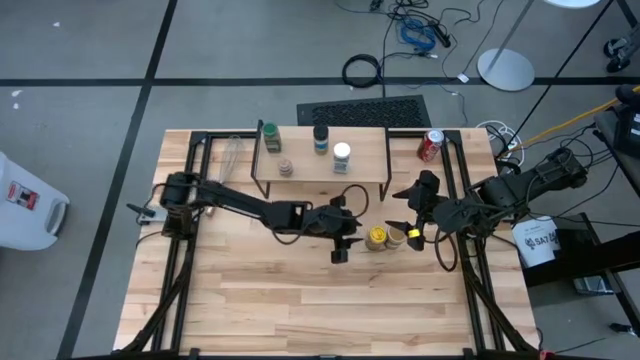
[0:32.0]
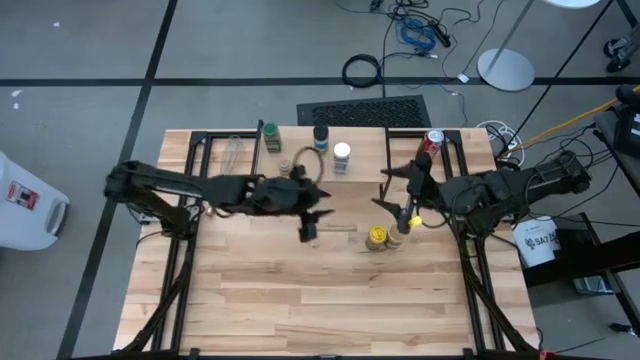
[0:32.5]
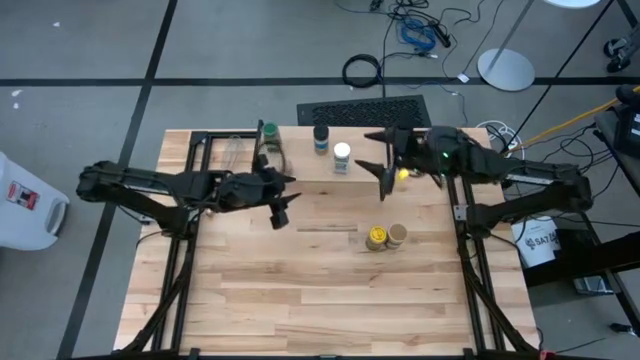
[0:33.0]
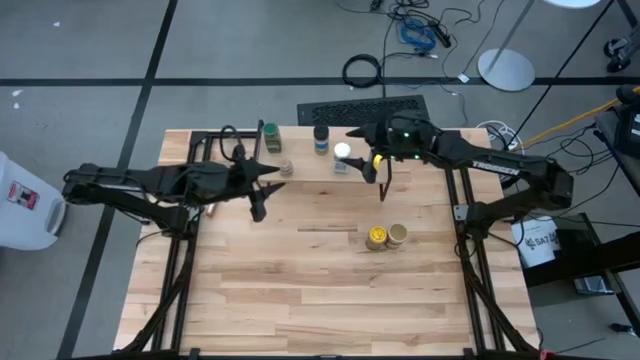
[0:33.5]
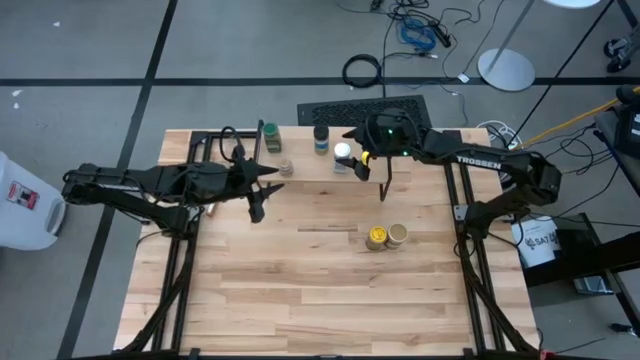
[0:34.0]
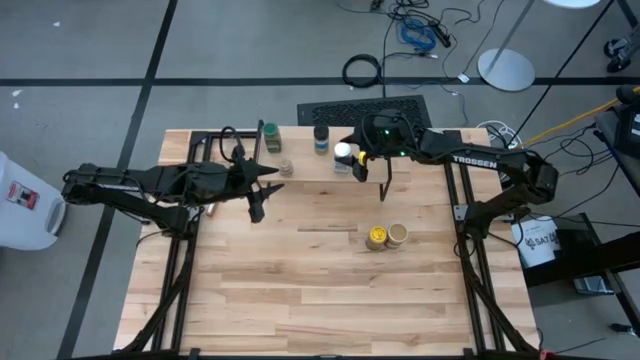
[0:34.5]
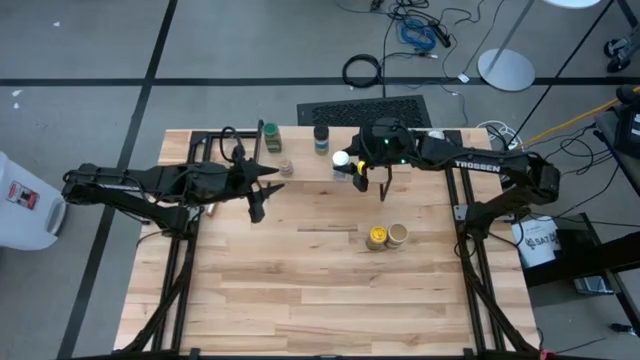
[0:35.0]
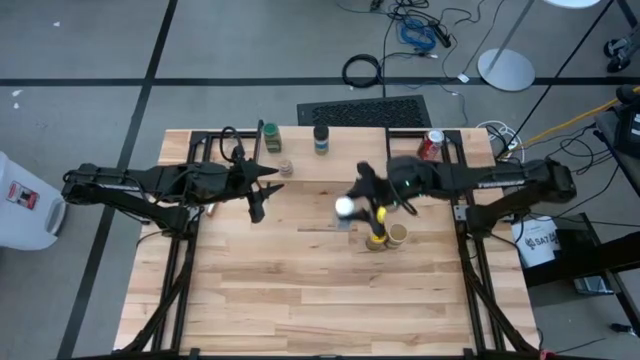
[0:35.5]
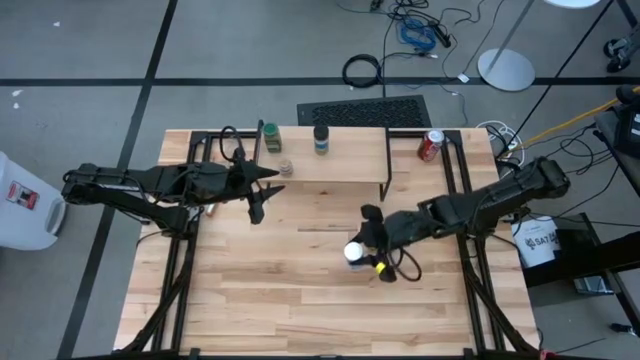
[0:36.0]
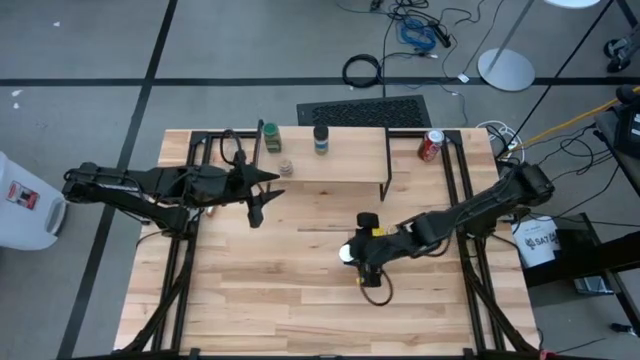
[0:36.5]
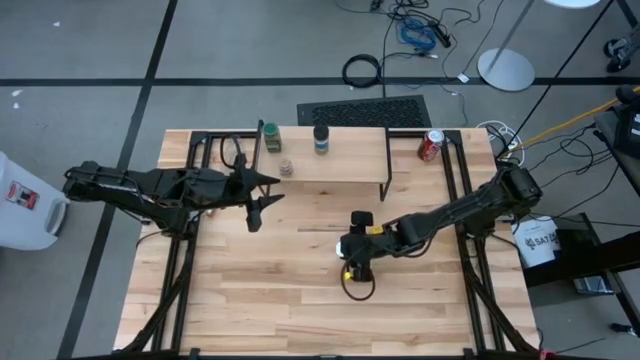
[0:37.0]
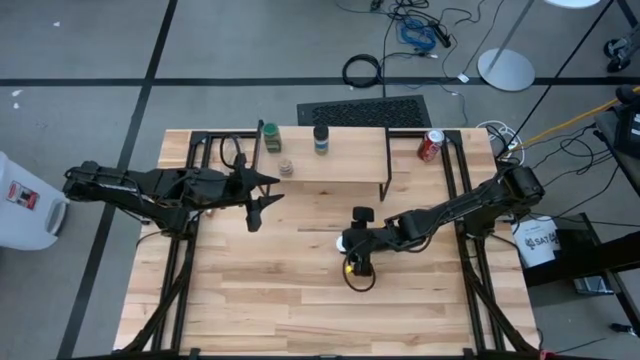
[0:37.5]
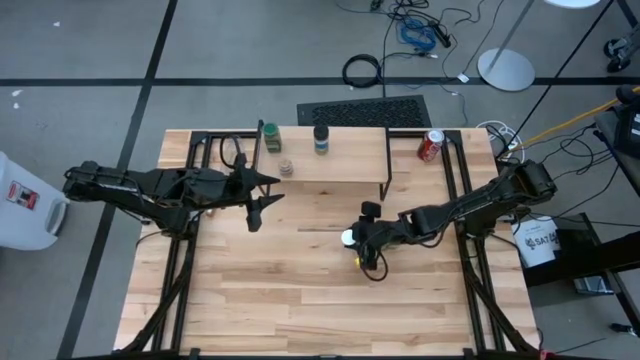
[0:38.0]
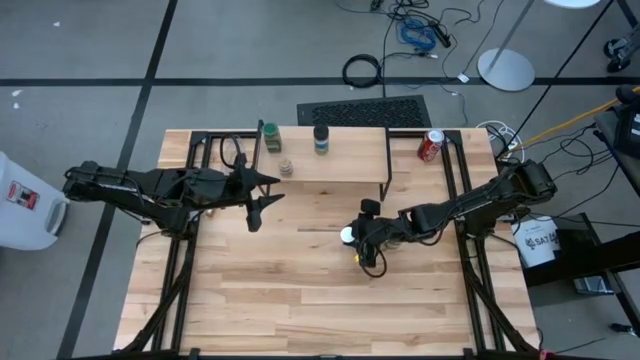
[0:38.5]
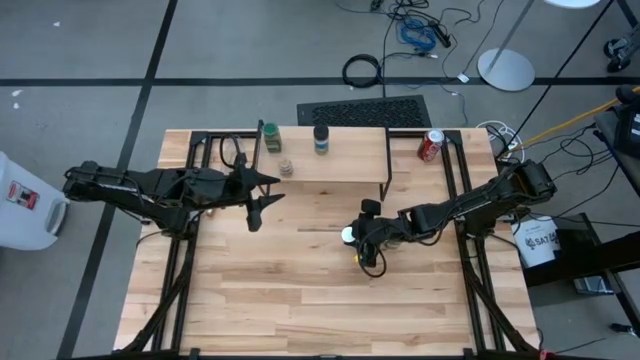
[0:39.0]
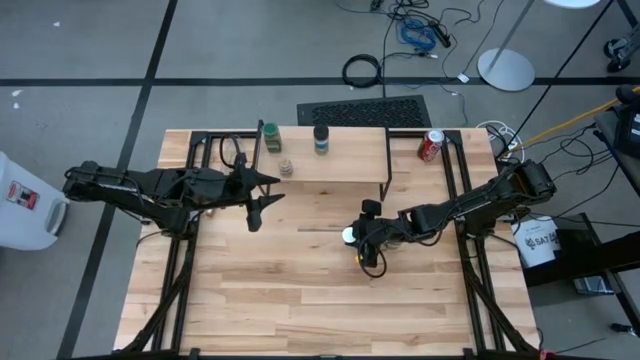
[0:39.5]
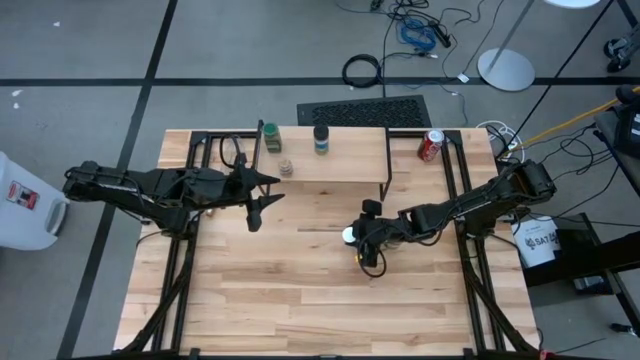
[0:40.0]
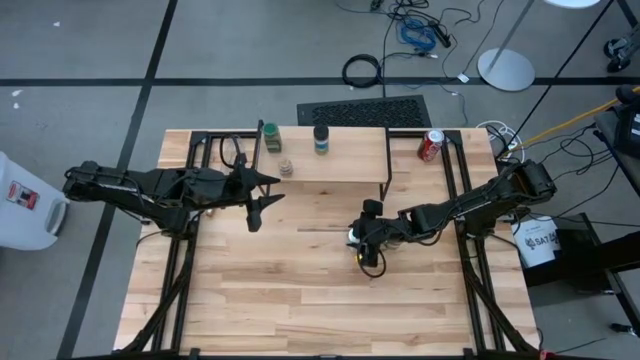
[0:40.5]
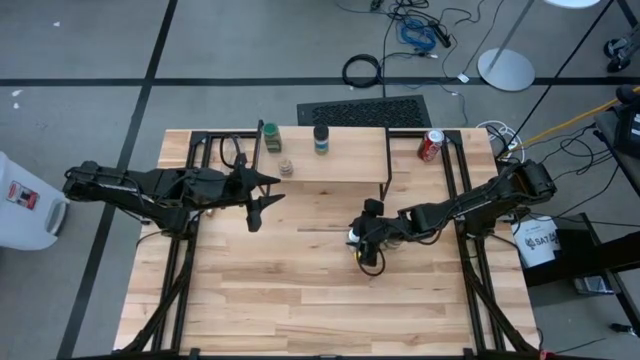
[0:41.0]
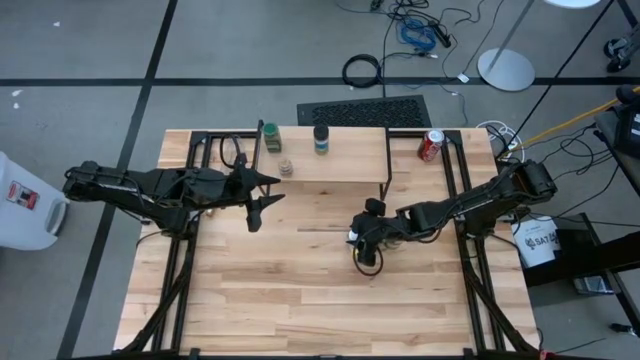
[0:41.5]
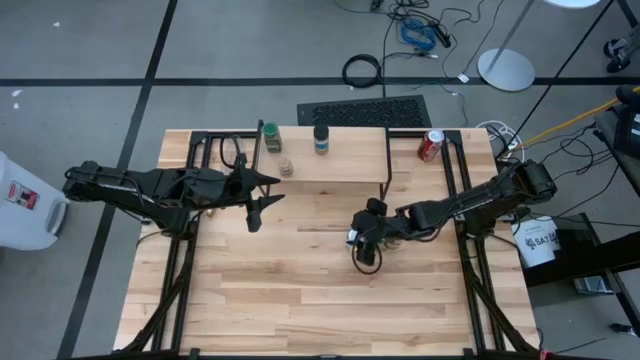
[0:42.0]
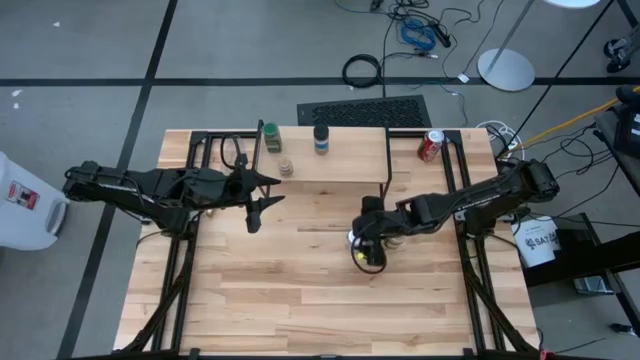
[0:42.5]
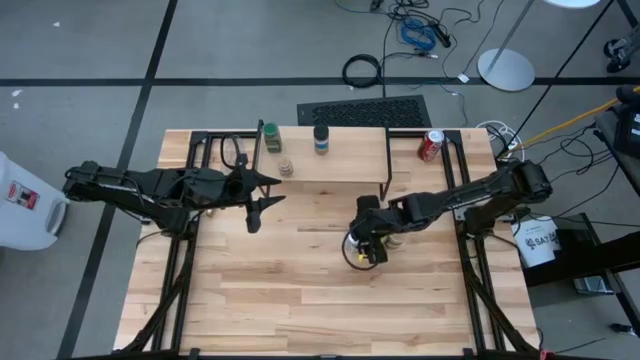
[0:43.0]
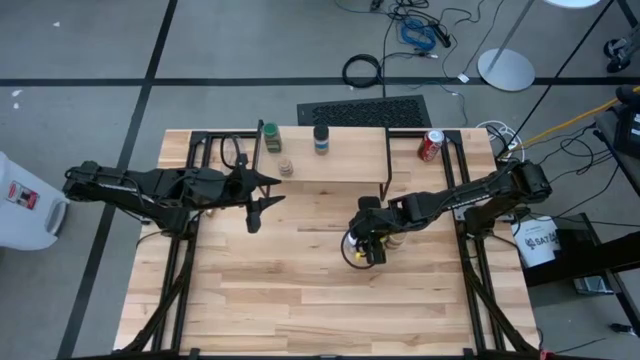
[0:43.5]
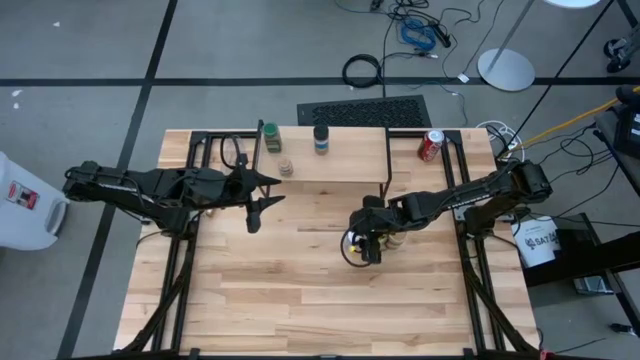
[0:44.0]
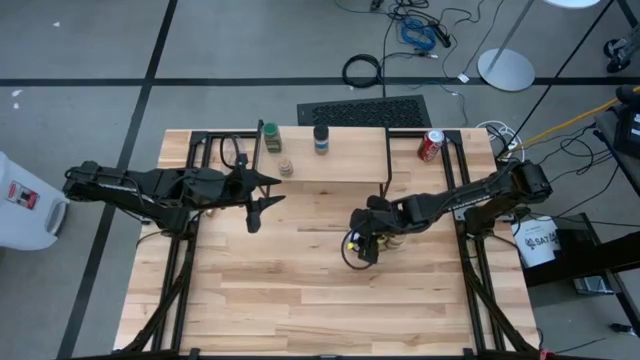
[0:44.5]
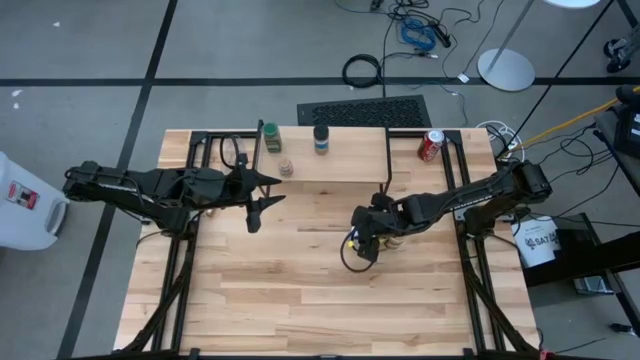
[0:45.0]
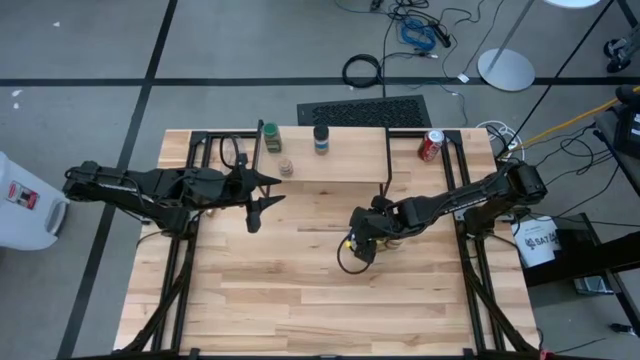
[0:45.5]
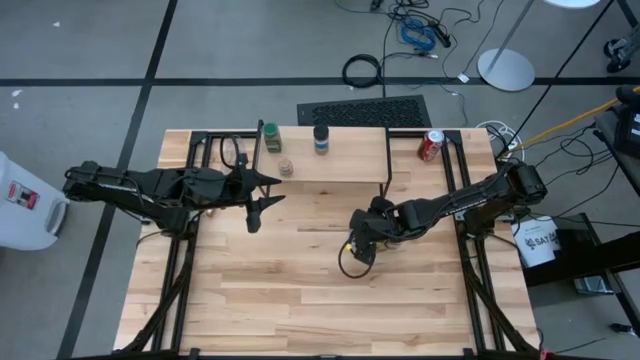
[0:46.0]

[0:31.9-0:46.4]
Task: Shelf spices
Remove the white seasoning bottle from the shelf

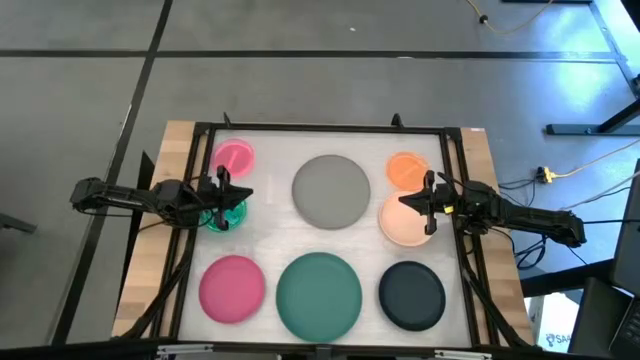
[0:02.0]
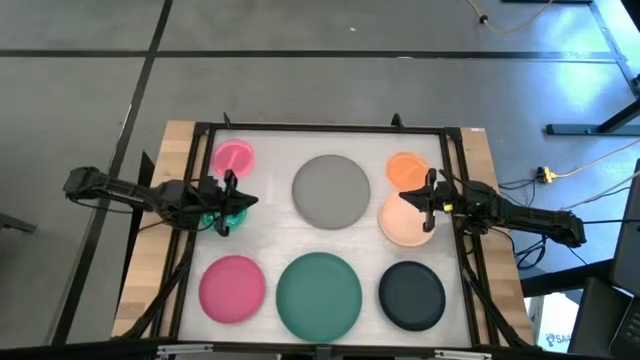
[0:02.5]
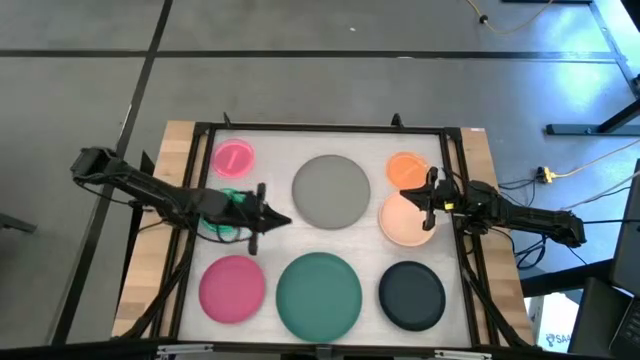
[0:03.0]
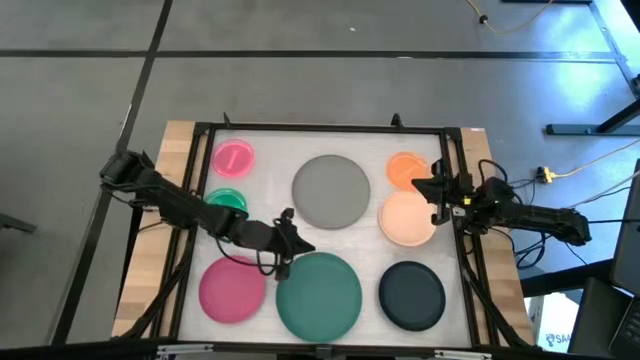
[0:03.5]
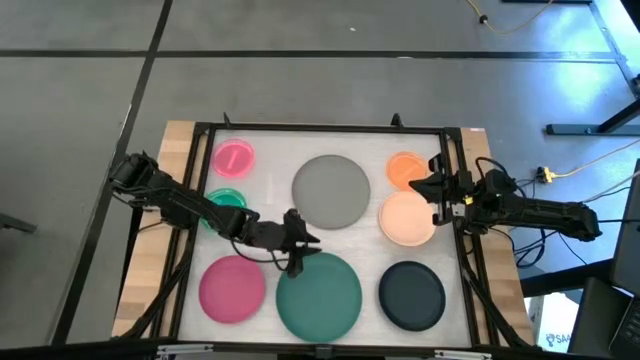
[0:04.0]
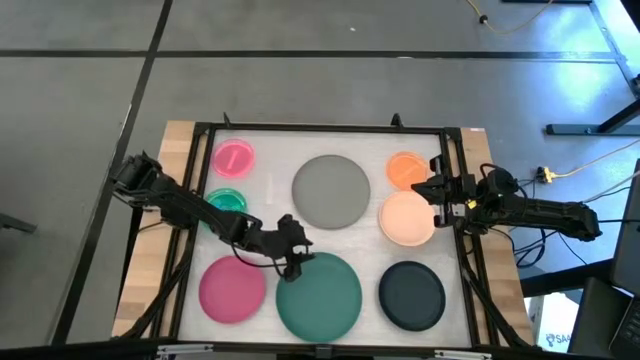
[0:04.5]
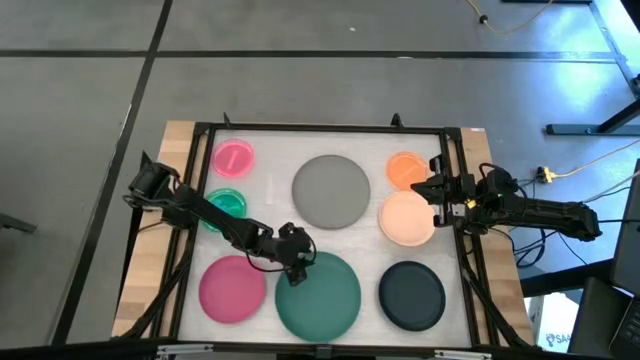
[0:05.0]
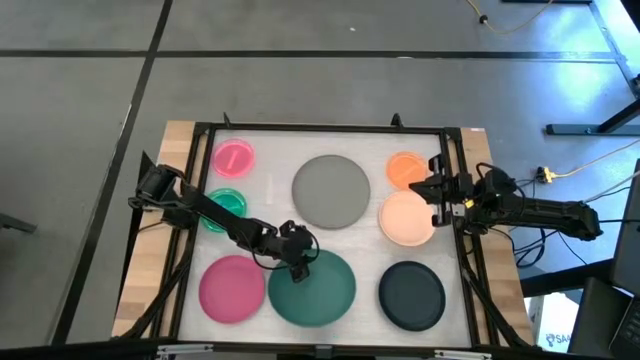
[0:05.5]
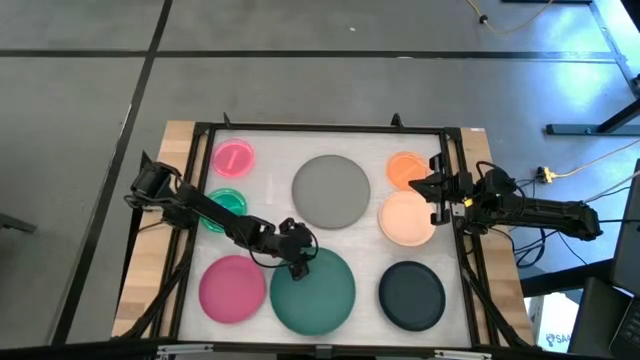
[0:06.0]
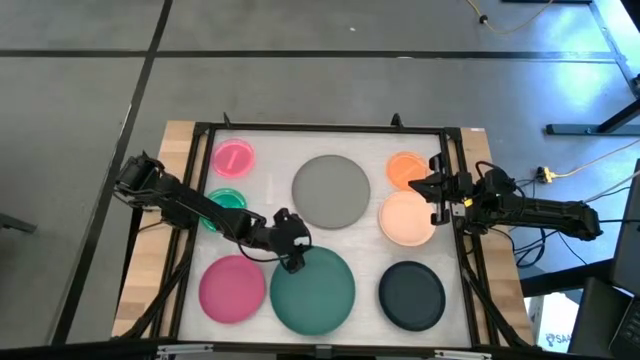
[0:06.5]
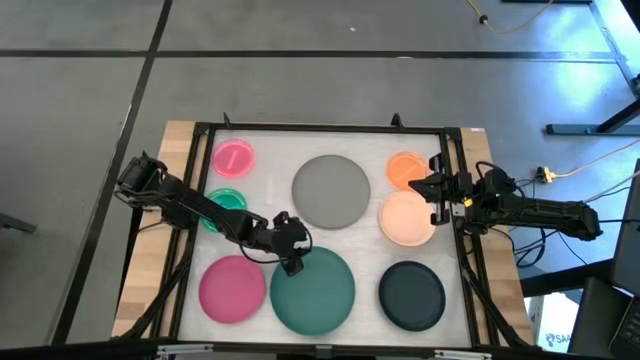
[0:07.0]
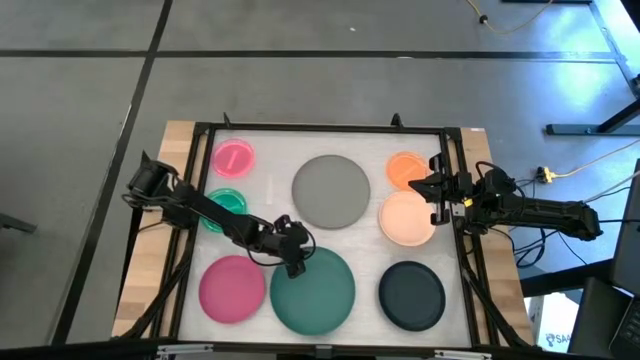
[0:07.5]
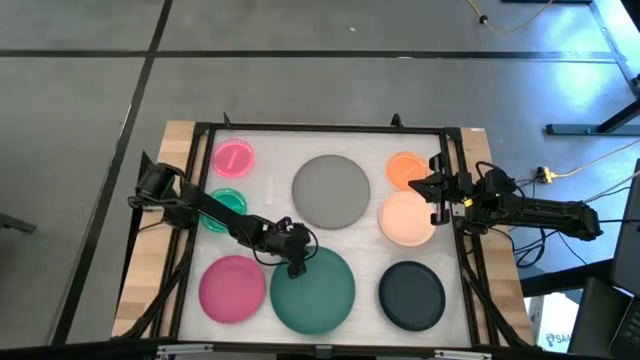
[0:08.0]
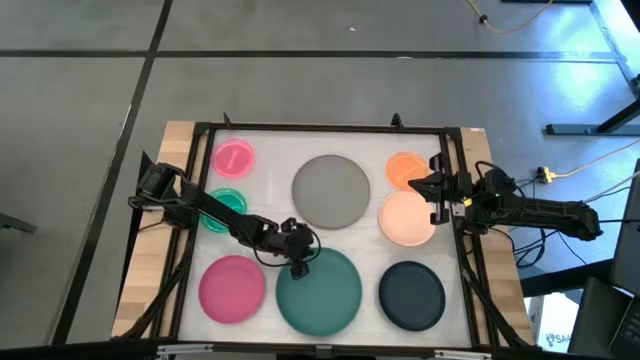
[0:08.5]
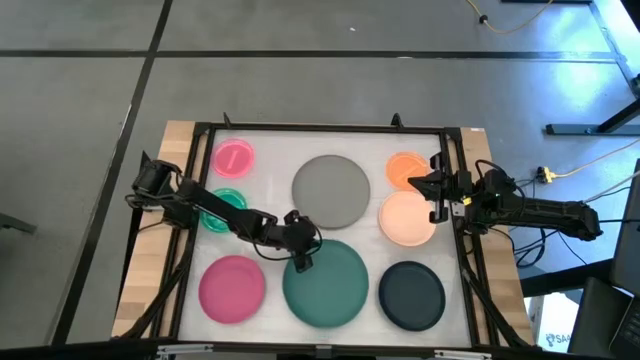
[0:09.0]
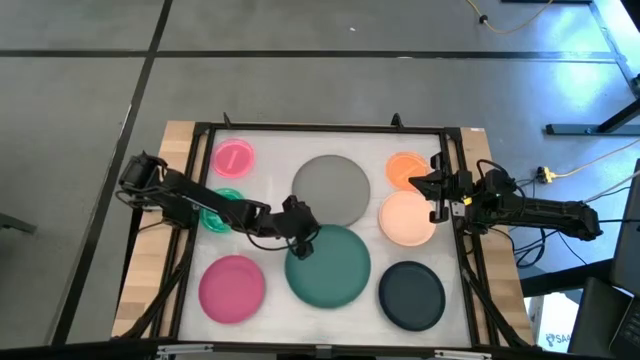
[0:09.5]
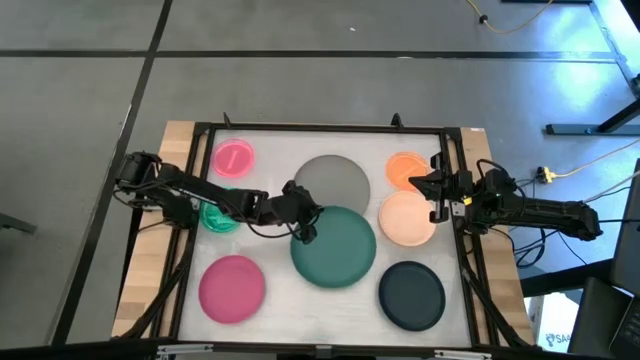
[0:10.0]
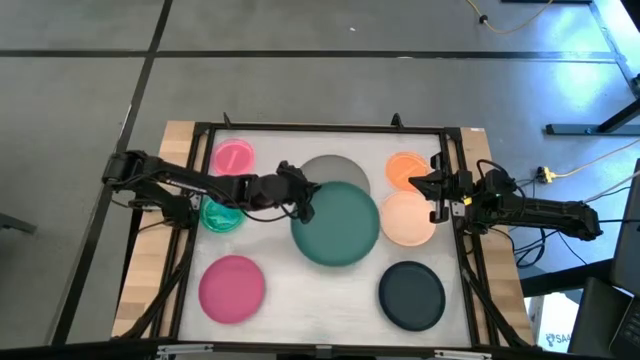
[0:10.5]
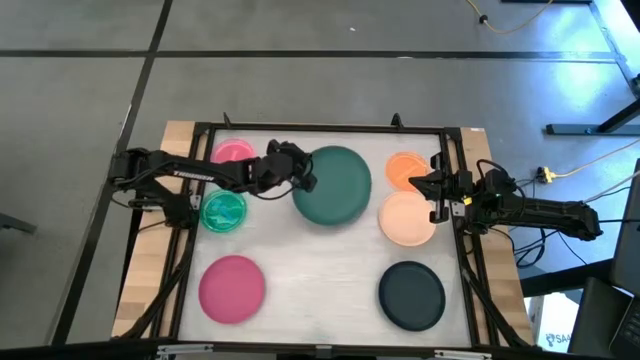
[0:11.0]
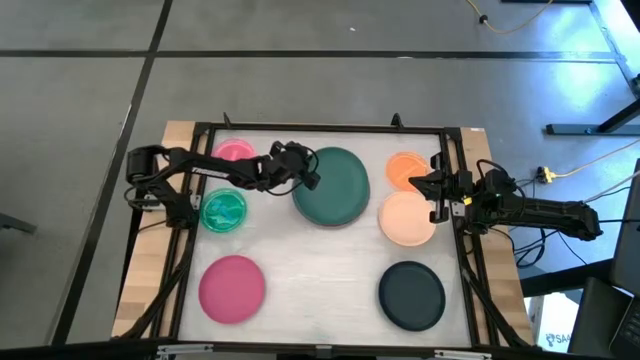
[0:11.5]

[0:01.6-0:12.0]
Task: Stack plastic plates
Stack the green plate on the gray plate
